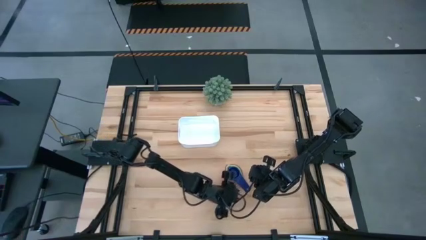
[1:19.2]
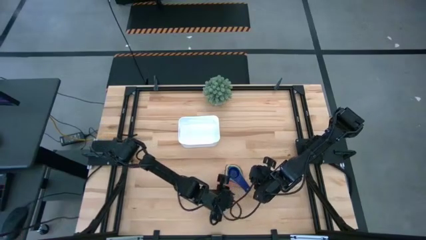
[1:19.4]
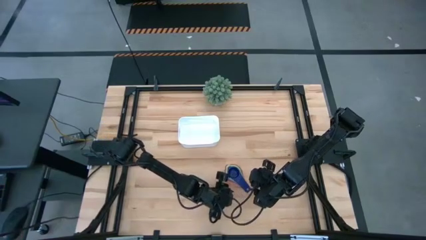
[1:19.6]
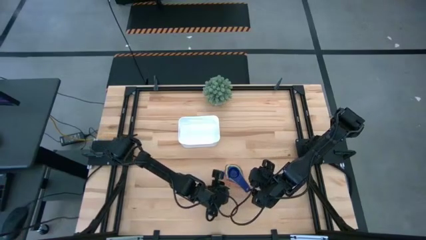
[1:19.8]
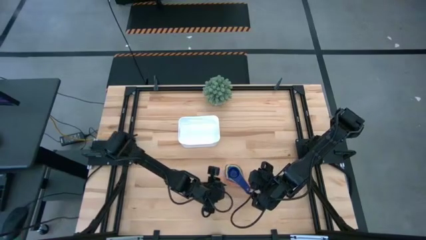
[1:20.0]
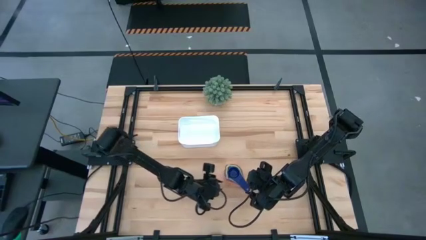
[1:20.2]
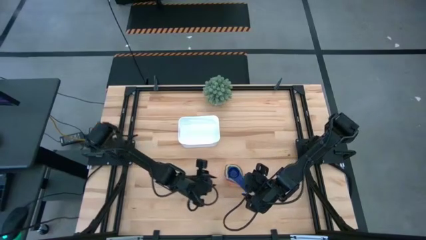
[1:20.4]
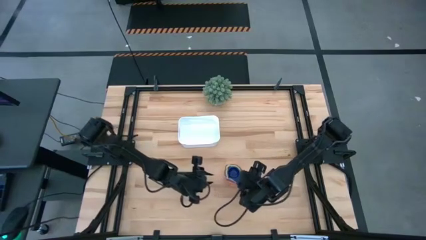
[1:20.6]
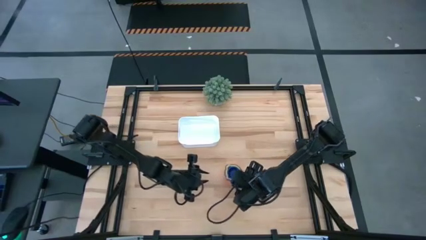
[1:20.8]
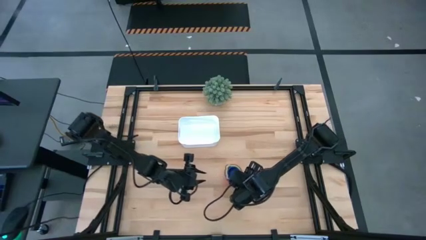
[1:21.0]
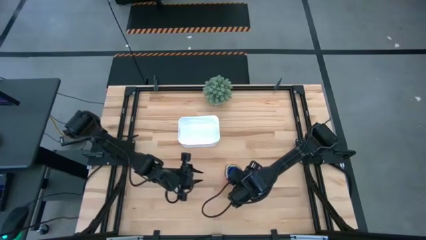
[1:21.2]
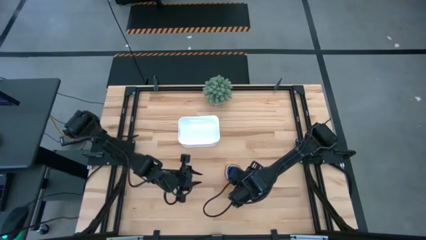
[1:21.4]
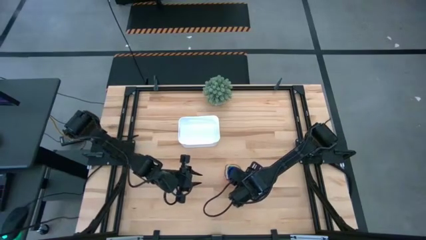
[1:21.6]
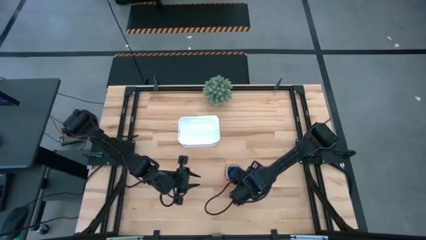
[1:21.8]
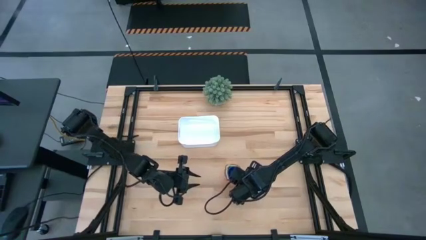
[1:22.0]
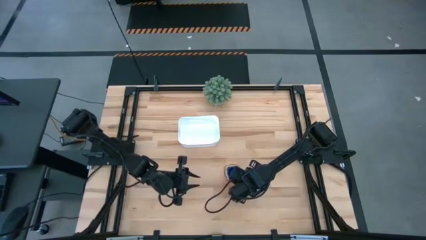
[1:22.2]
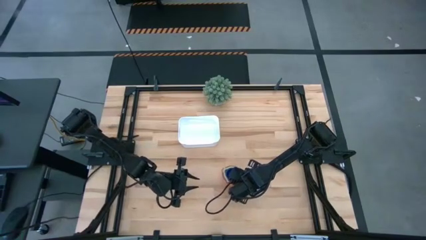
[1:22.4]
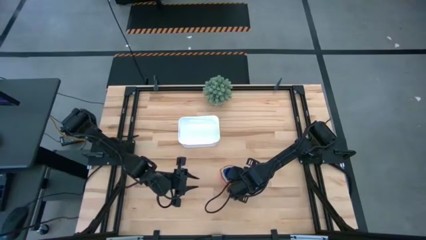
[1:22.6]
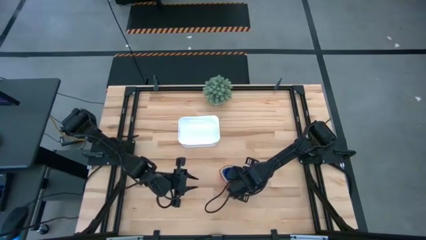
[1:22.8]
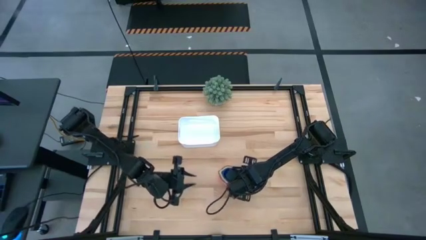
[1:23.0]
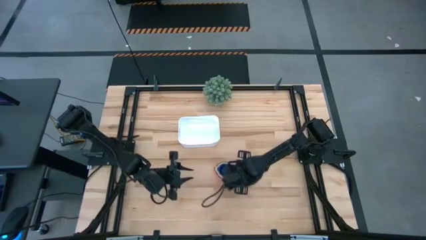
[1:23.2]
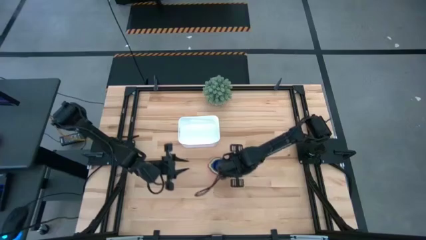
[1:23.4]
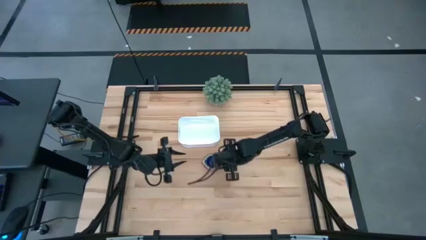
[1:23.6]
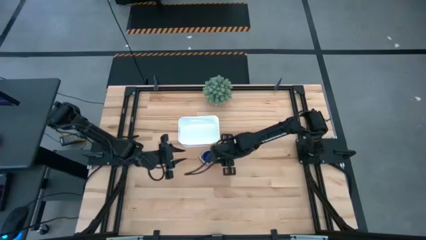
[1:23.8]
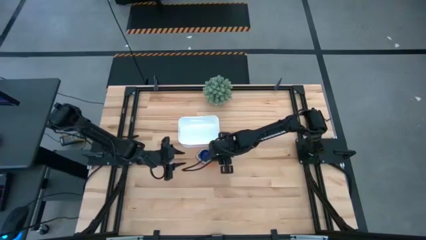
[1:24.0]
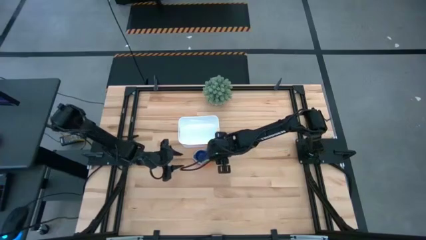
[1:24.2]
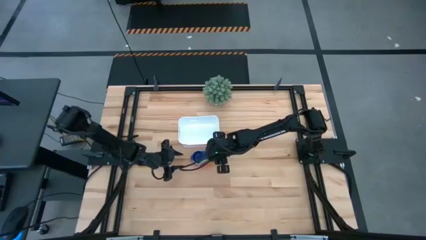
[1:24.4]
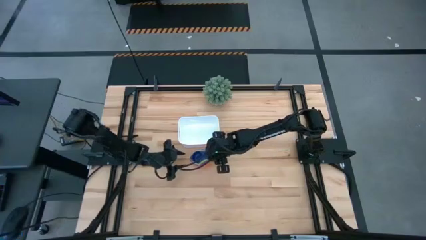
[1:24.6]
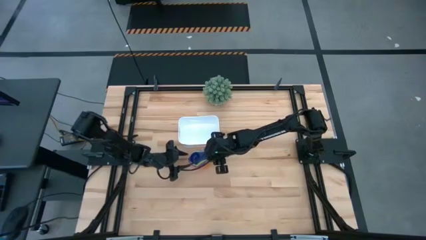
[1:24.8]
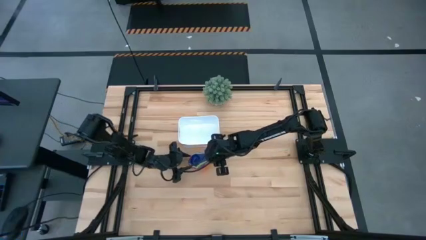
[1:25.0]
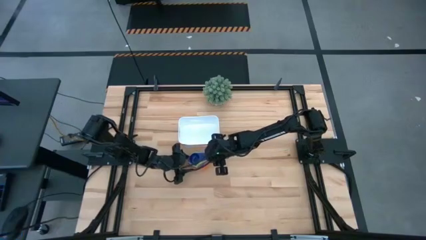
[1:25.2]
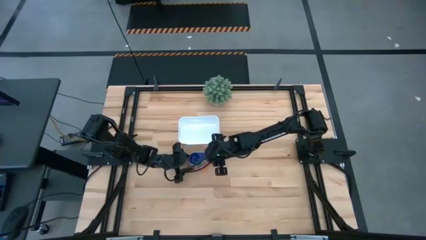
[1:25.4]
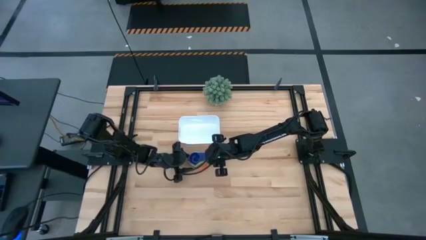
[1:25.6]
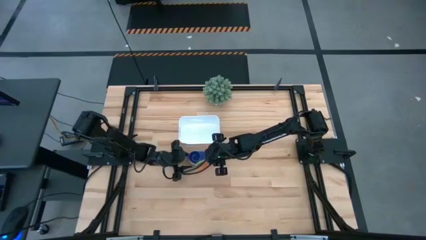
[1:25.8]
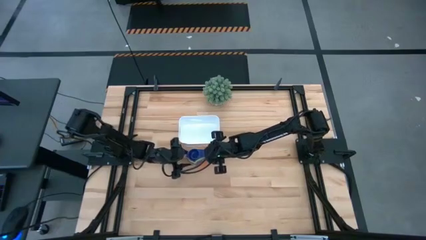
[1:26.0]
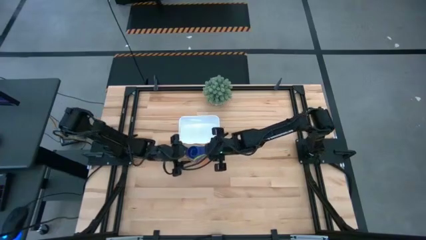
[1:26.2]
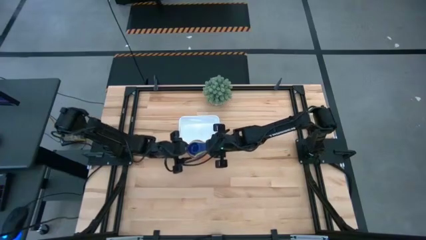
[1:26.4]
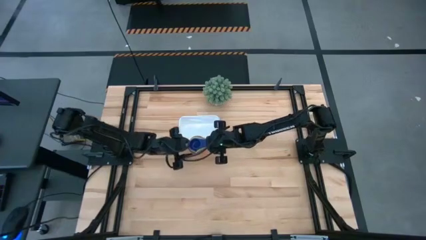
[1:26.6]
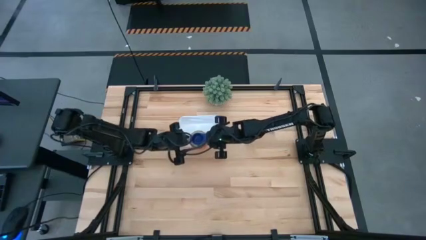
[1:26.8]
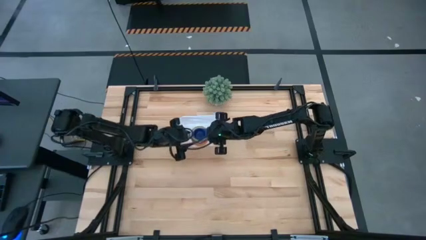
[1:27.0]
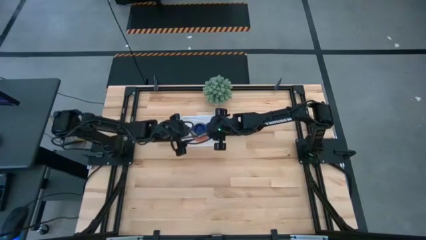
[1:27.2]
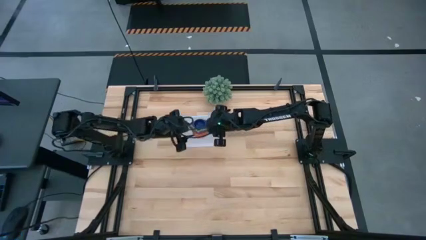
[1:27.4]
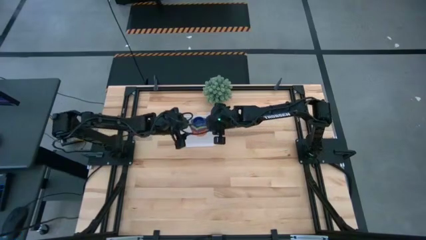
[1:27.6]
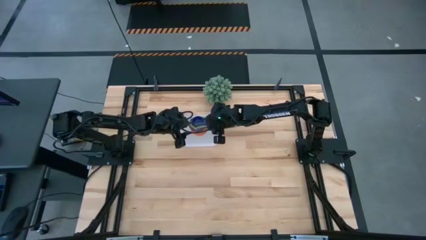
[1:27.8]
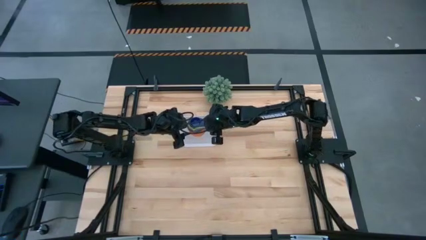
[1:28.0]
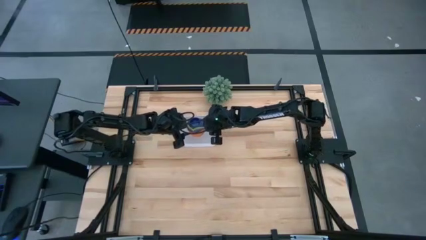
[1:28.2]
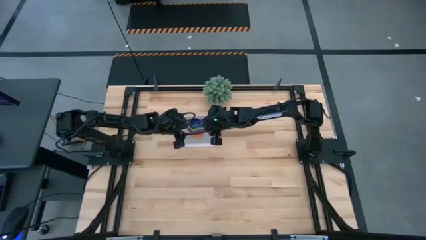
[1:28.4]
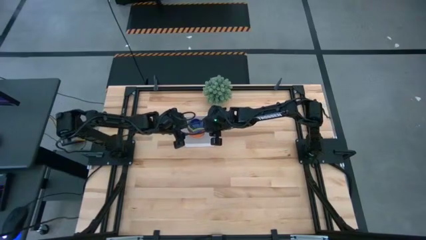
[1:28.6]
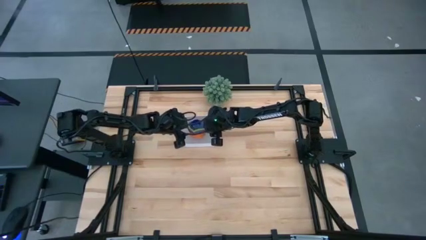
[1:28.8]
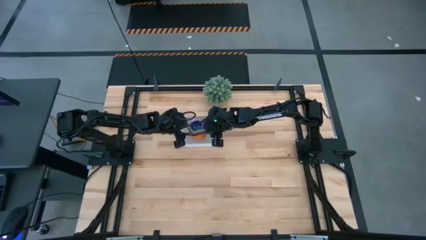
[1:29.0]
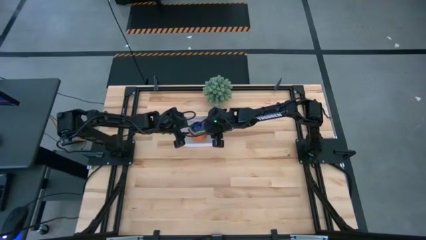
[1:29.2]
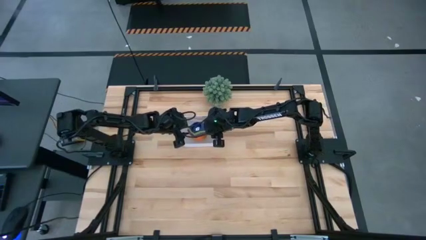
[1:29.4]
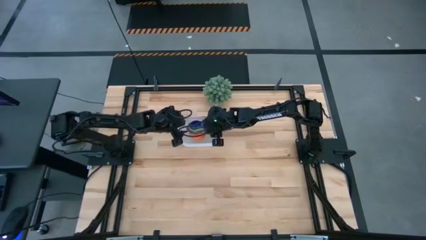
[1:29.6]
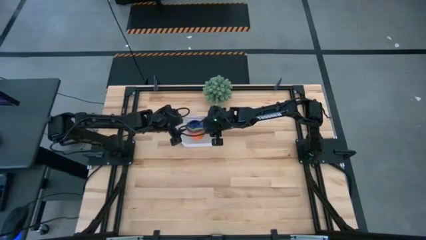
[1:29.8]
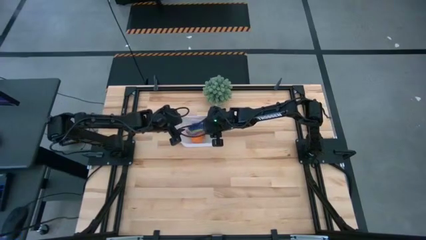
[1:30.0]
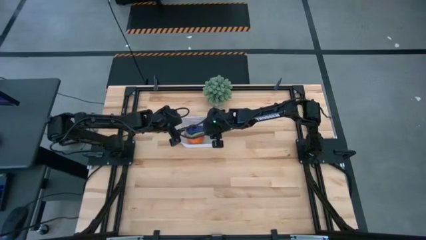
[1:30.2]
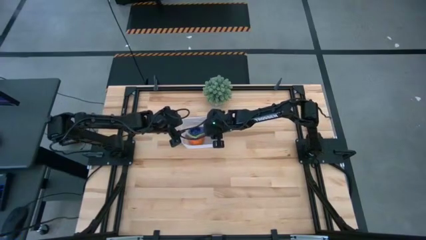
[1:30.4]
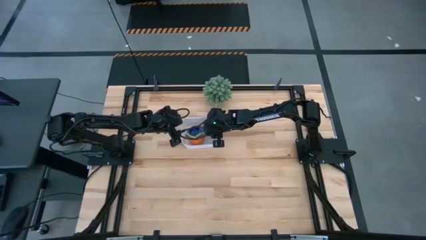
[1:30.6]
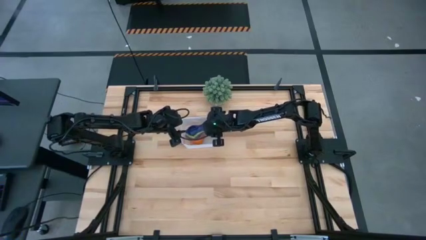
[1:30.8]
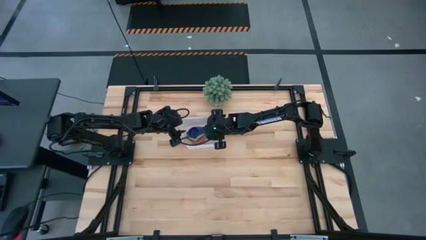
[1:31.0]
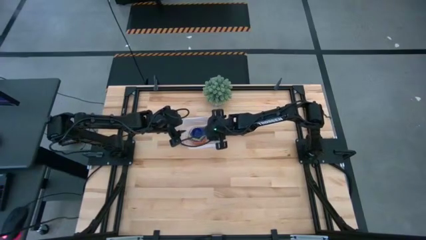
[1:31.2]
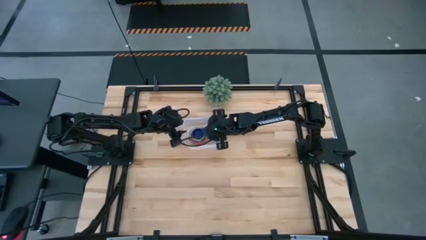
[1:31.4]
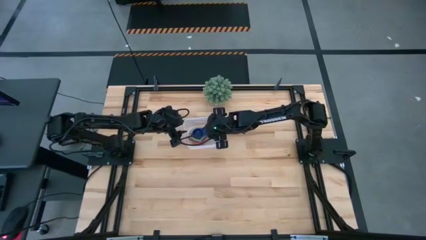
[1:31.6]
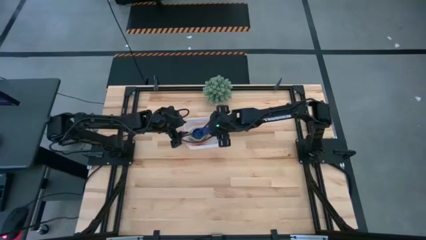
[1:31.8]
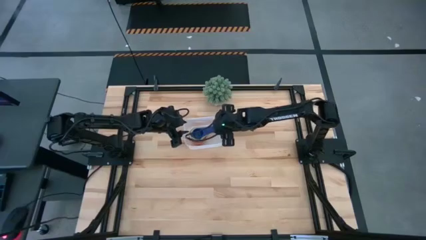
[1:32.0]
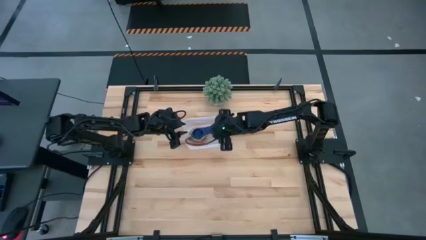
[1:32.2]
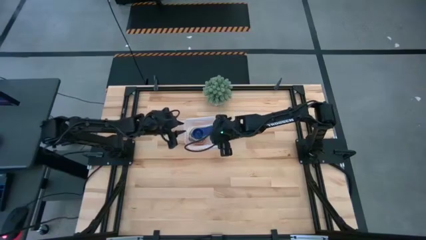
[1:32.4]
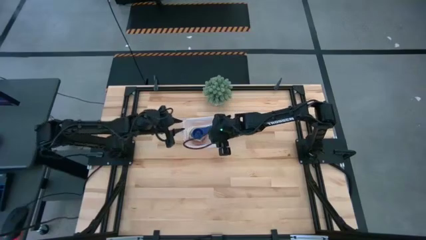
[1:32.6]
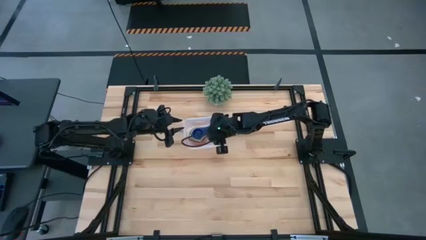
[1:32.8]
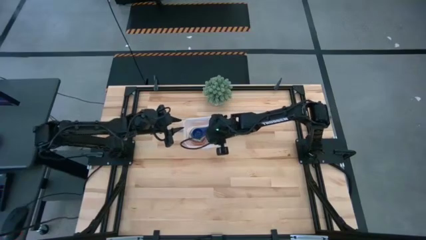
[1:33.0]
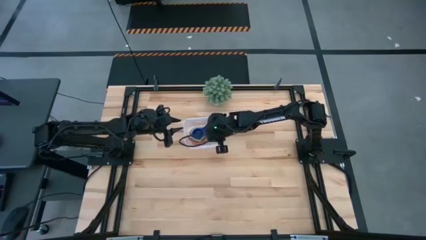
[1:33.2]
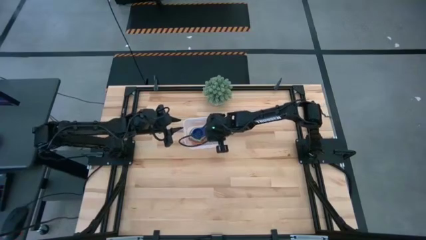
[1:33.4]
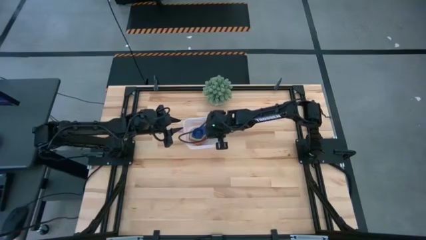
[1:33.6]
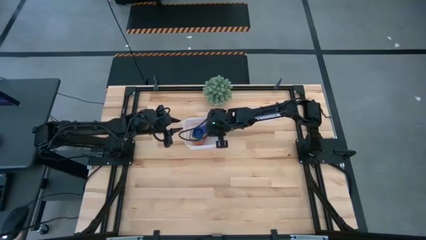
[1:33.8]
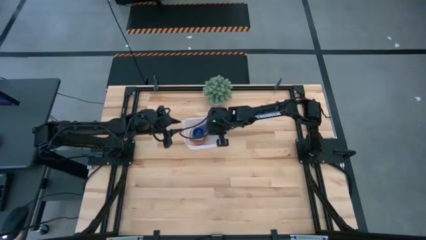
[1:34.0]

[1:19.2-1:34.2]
Task: Nest measuring cups in basket
Put the stacked measuring cups into the white bin
